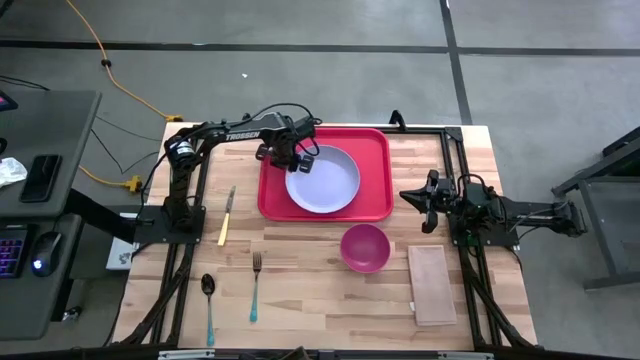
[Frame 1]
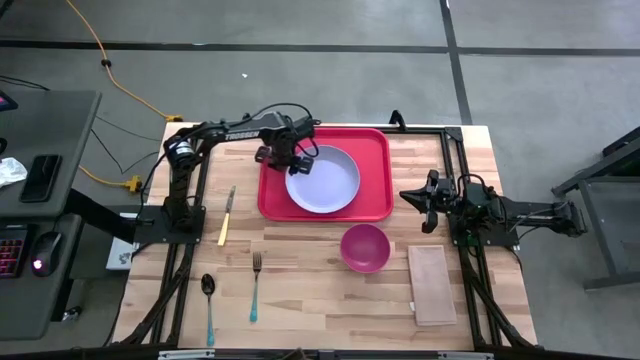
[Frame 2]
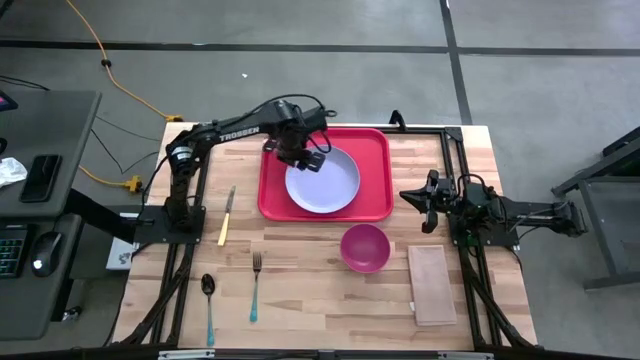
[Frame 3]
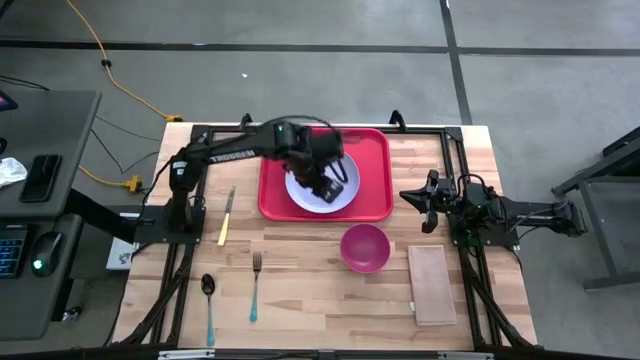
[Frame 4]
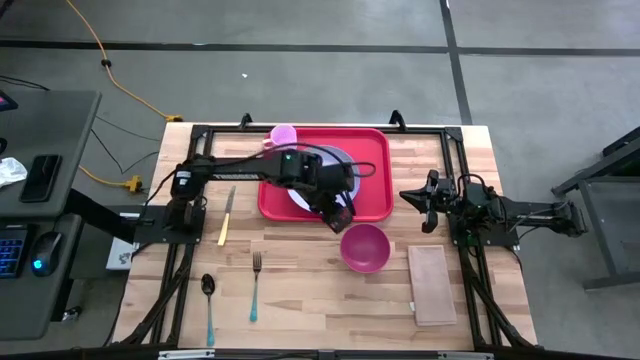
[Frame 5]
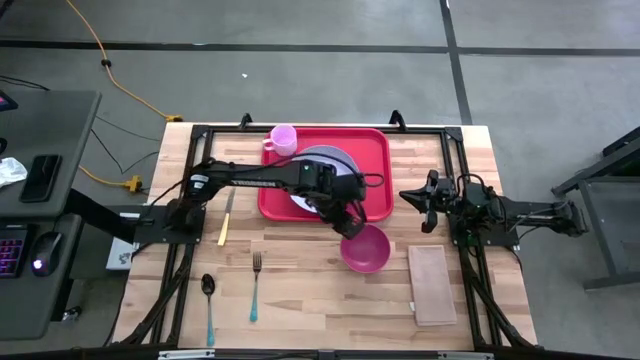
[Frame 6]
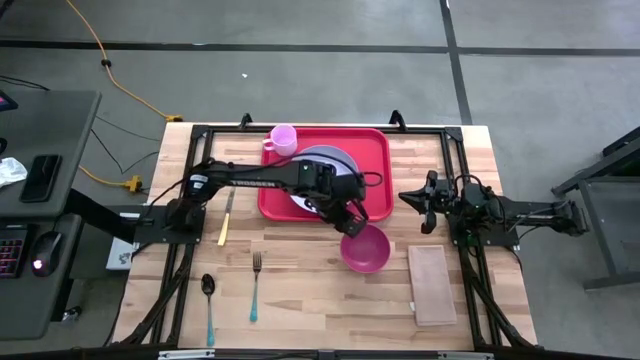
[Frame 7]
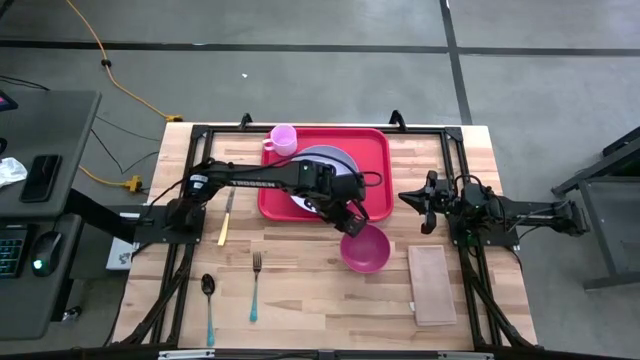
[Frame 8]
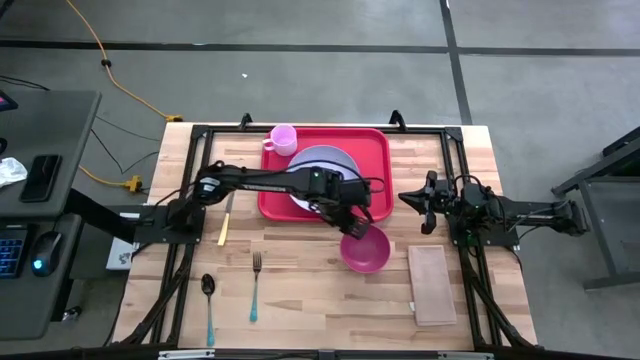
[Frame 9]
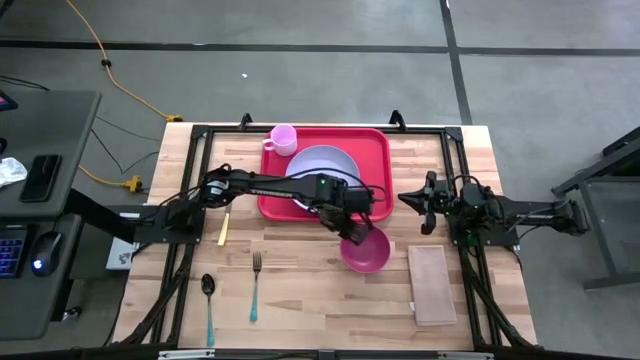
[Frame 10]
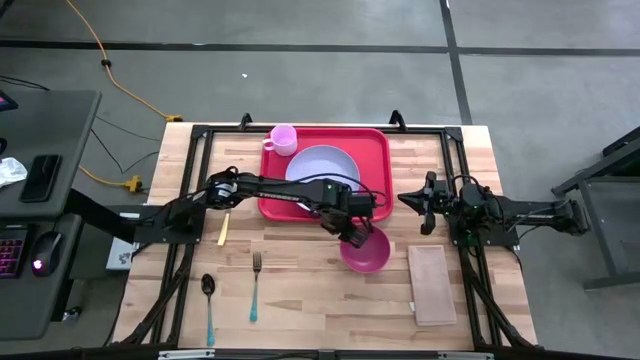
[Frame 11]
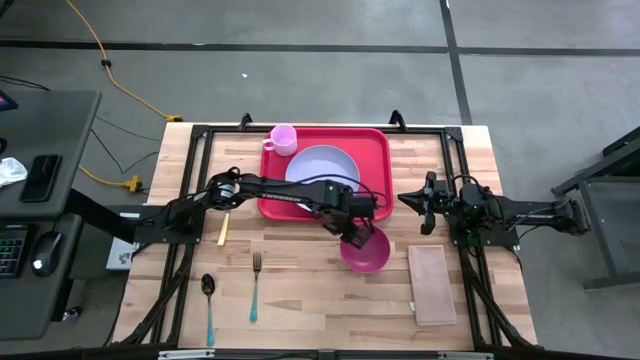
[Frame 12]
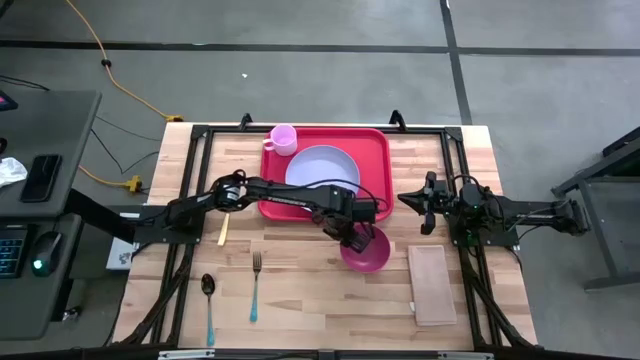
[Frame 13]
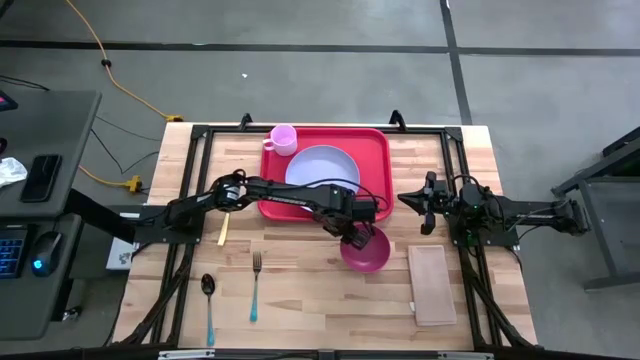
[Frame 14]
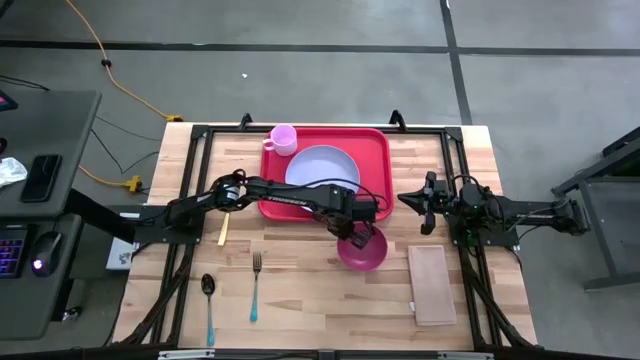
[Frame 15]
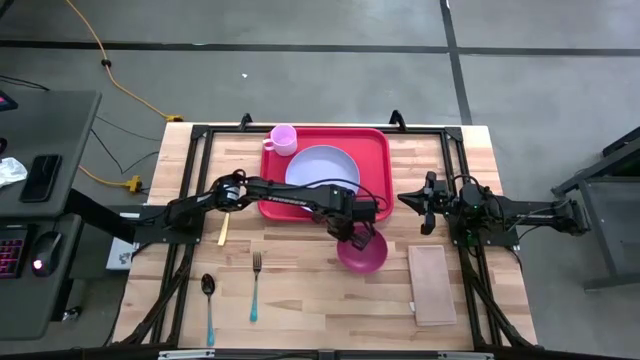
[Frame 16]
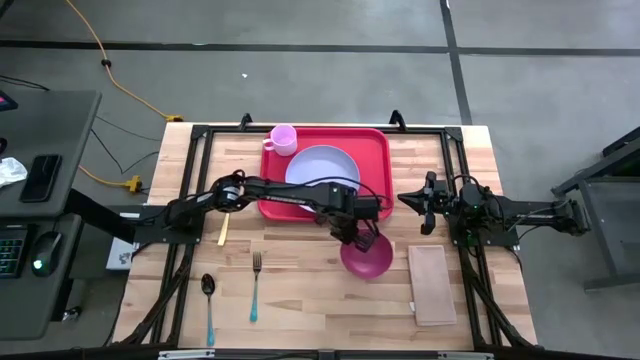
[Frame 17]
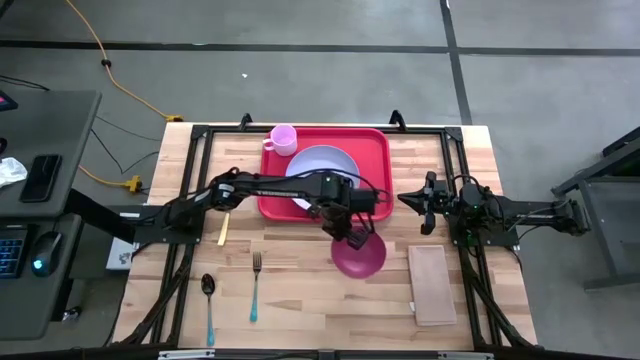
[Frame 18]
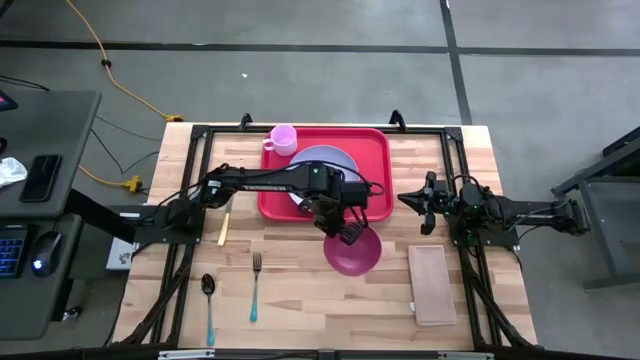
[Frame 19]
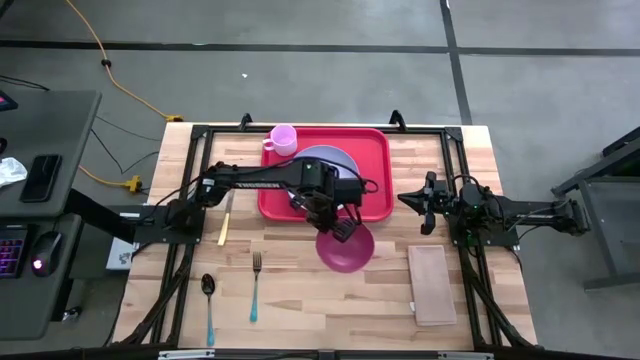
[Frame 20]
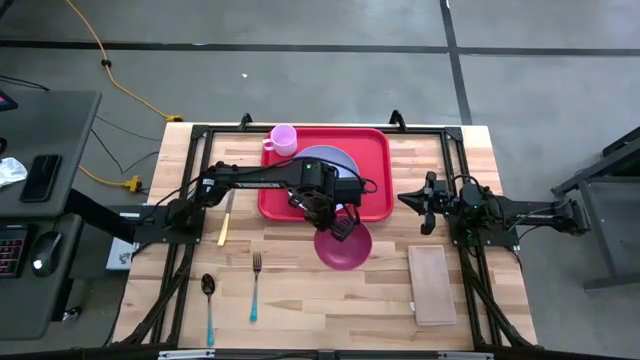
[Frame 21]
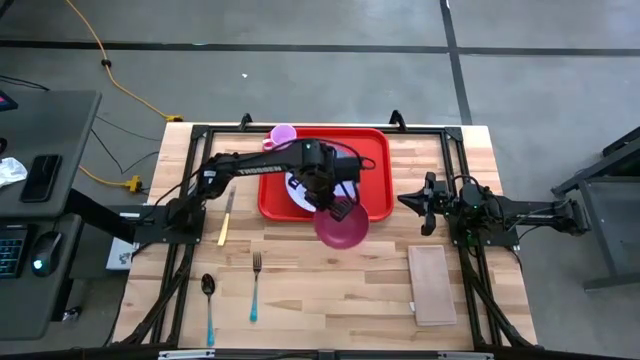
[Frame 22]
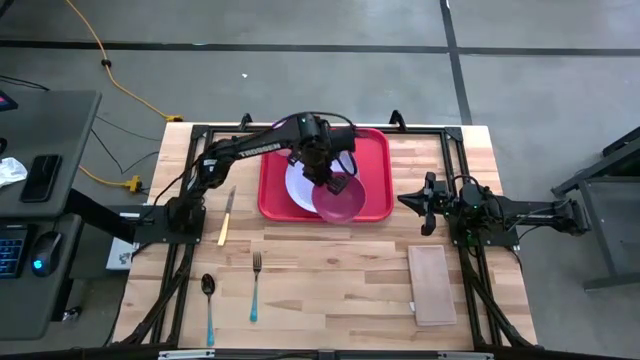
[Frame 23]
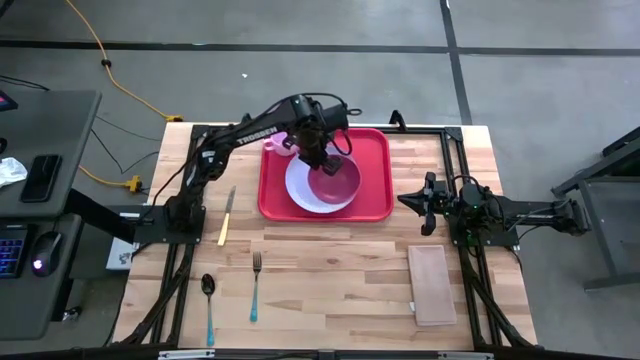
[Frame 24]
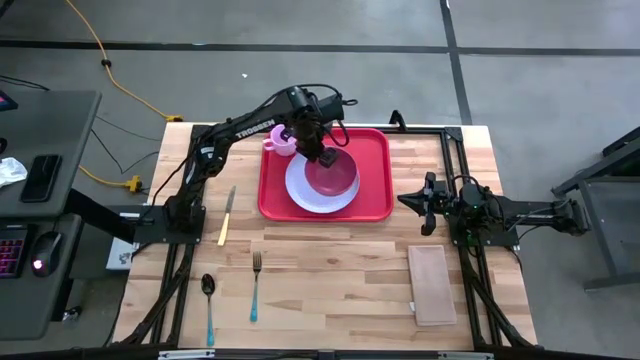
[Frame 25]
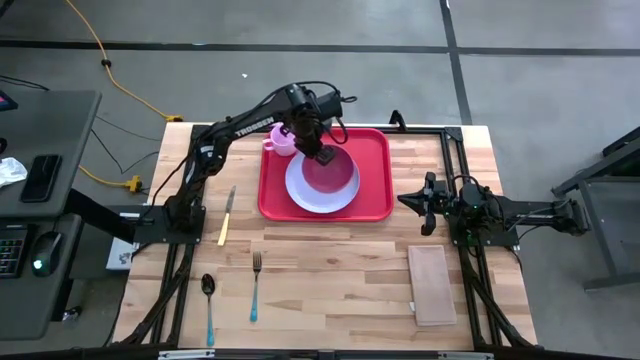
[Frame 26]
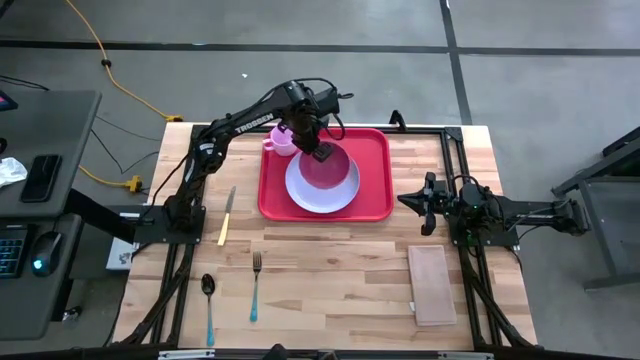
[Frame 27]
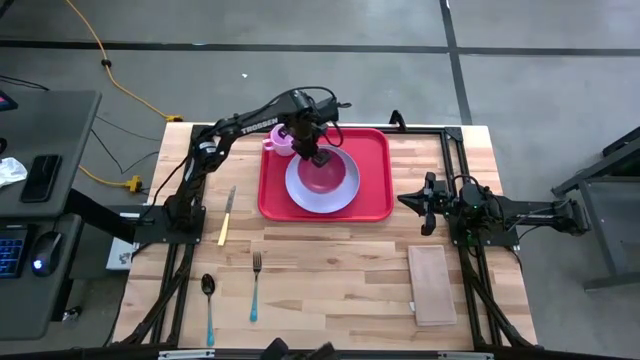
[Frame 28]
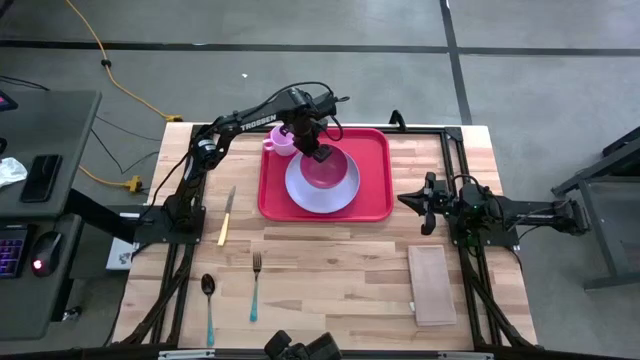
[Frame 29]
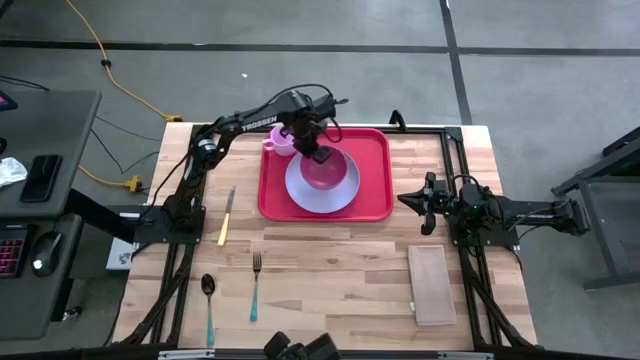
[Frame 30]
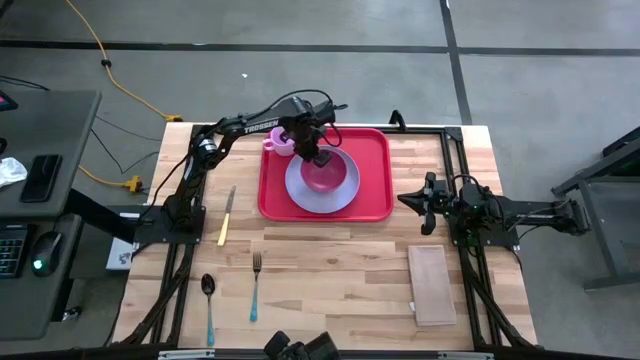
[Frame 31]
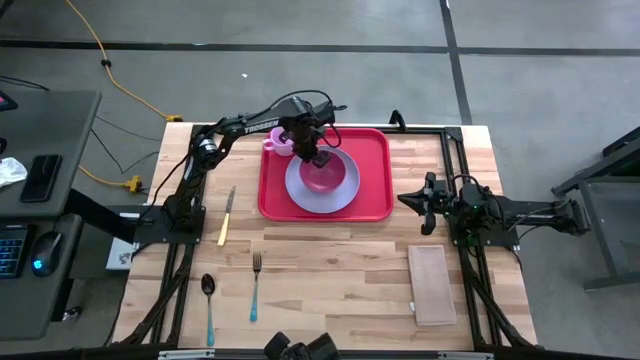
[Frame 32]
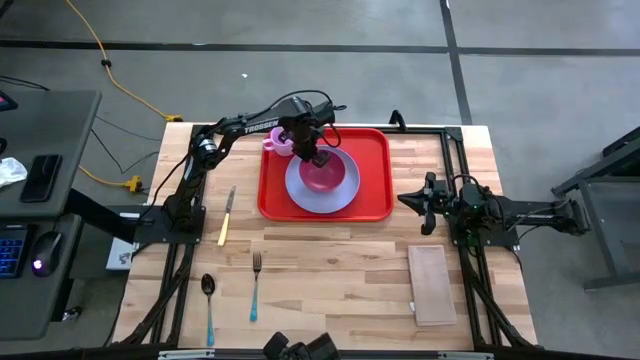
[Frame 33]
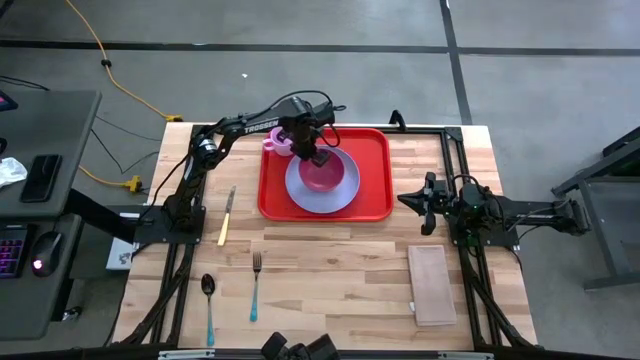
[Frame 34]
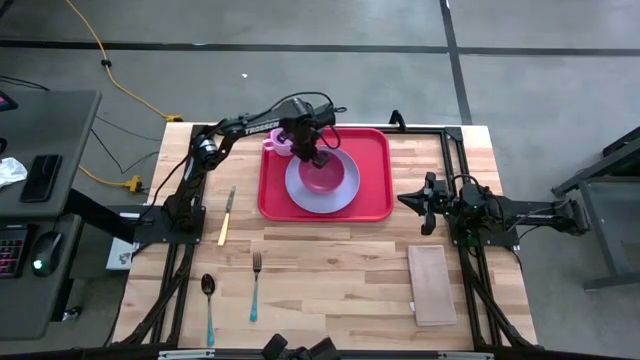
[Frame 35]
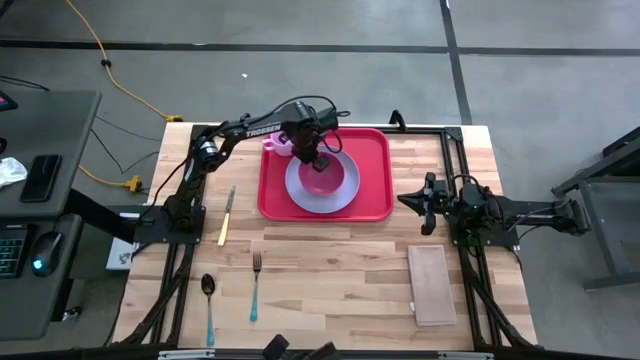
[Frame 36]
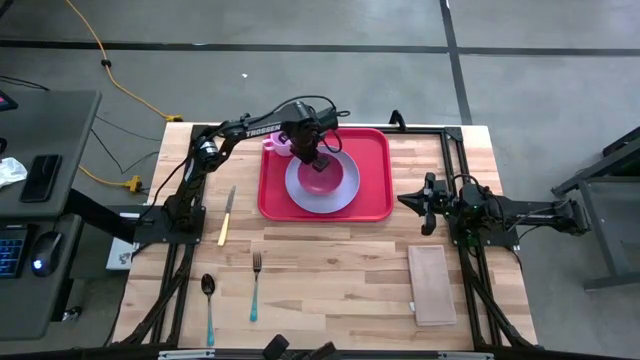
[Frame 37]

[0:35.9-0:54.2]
Task: Set up tray
Put the red bowl on the blue plate on the orange serving tray

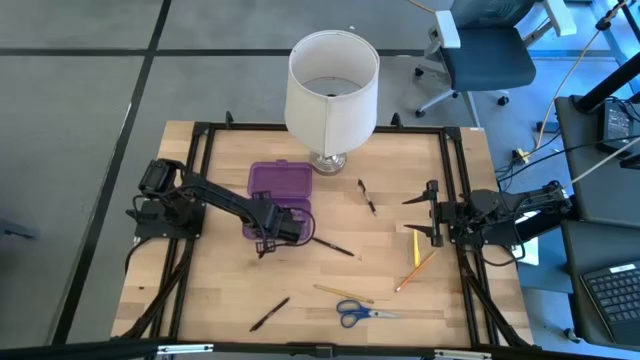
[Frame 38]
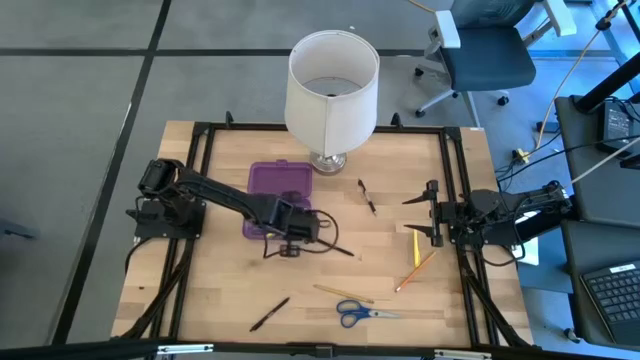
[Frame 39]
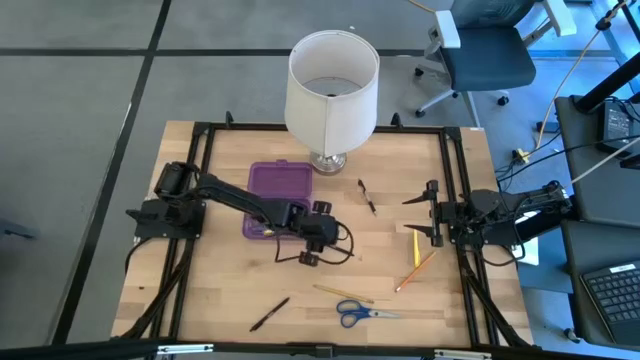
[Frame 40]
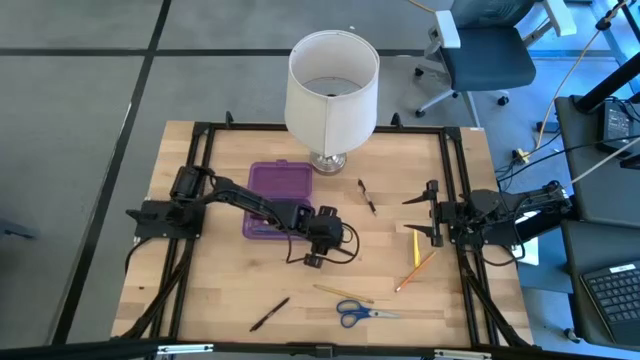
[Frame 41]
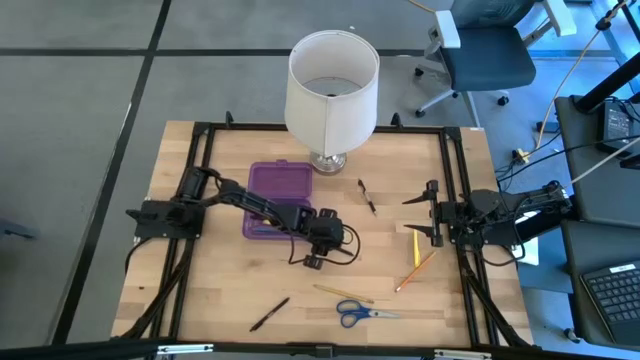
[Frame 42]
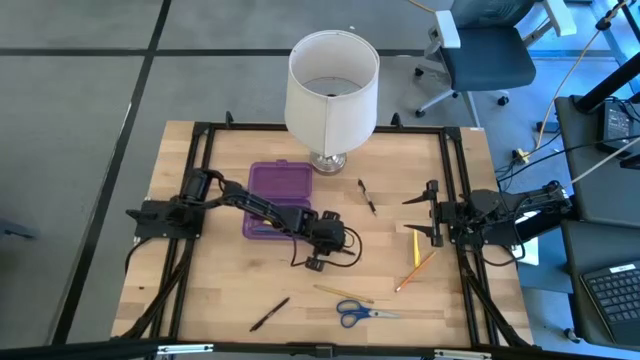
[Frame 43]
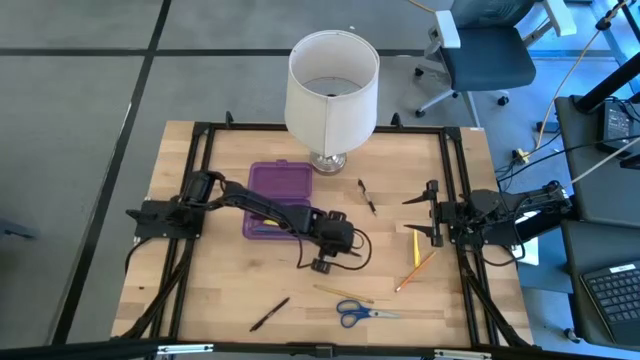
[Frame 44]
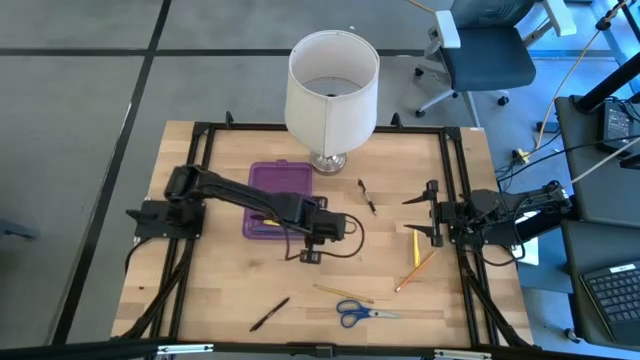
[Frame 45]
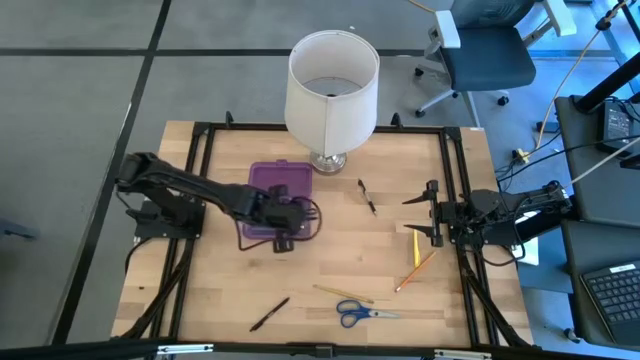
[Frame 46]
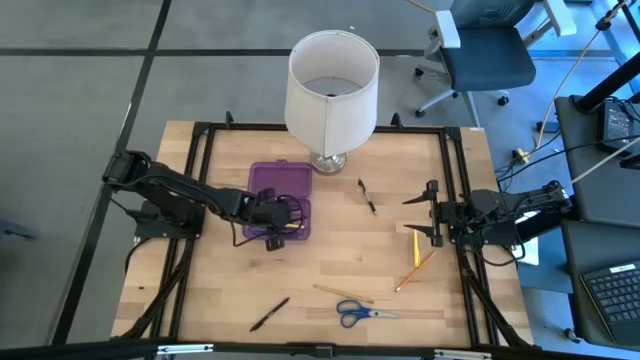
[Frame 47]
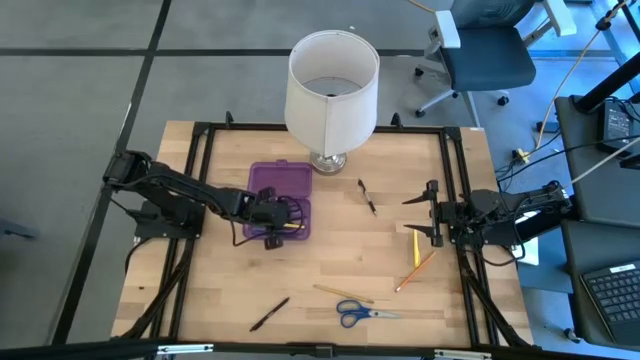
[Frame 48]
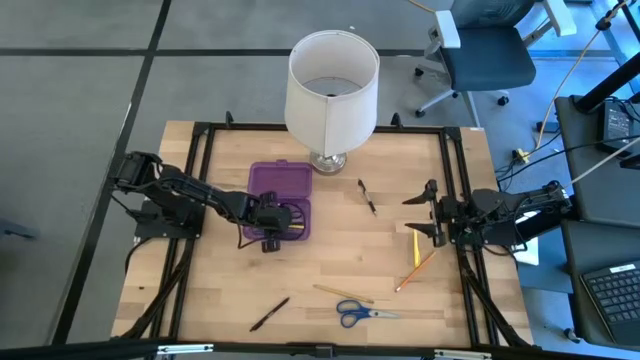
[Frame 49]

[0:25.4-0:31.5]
Task: Pick & place school supplies into a supply box
Put the top black pen into the purple supply box
